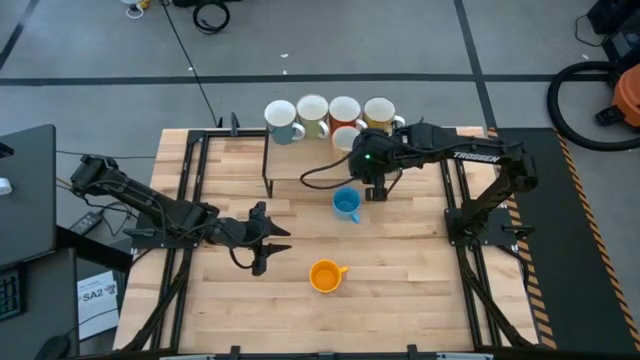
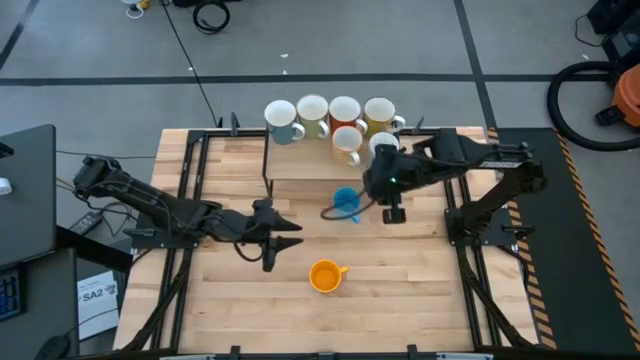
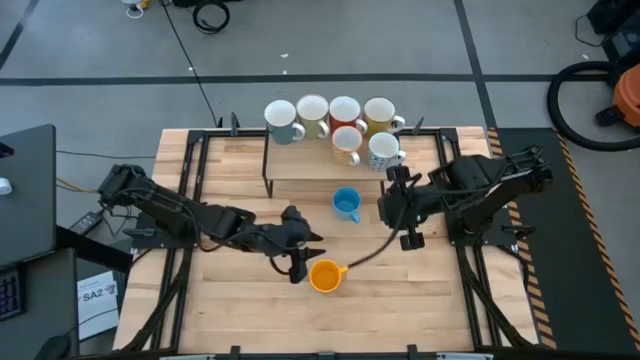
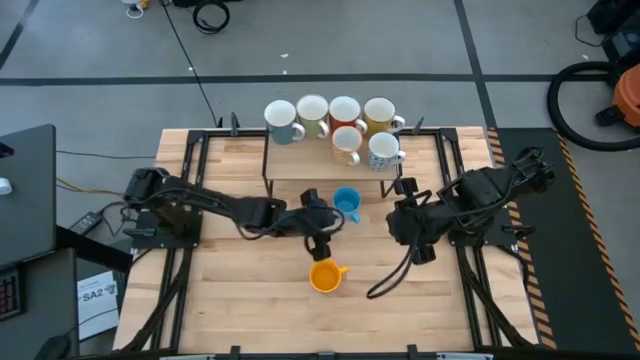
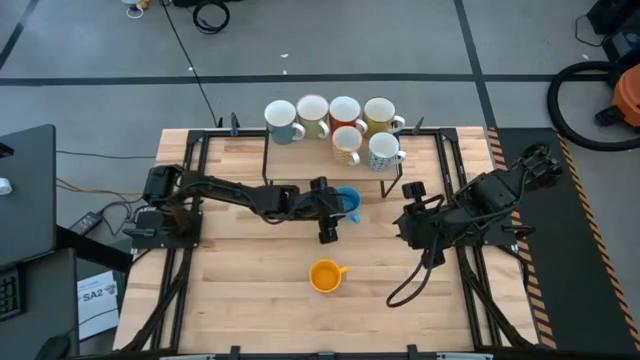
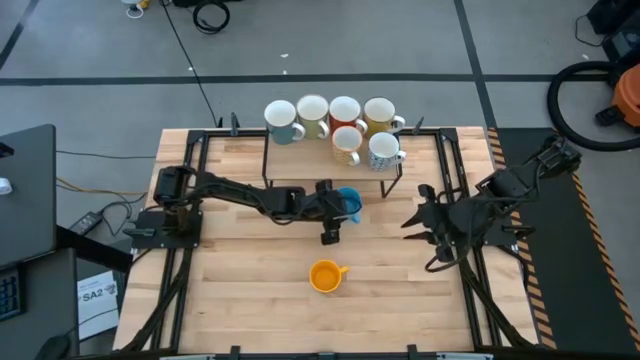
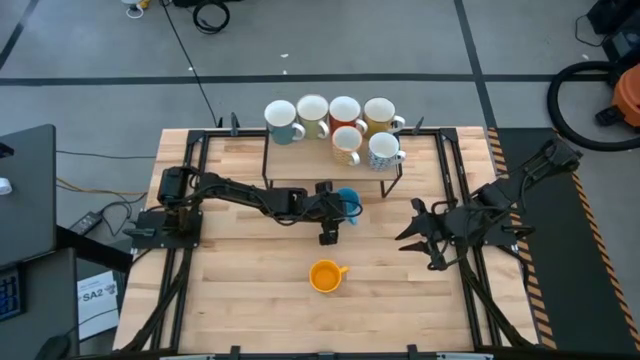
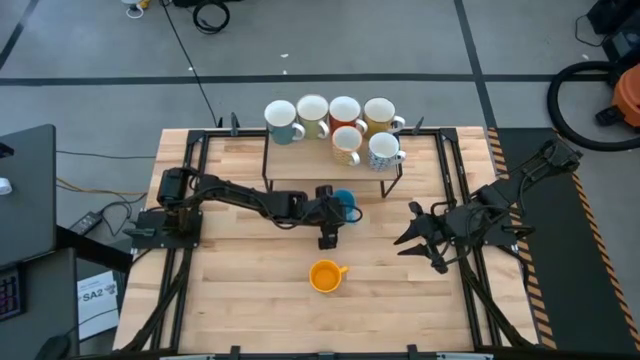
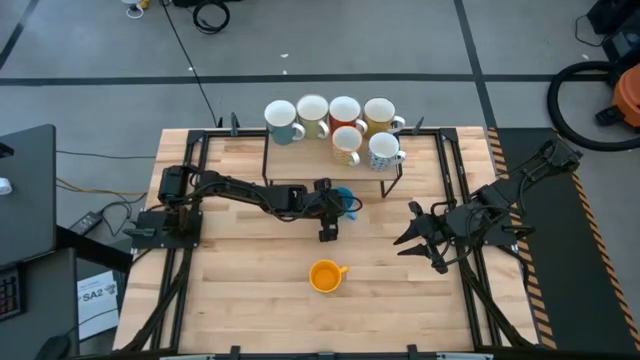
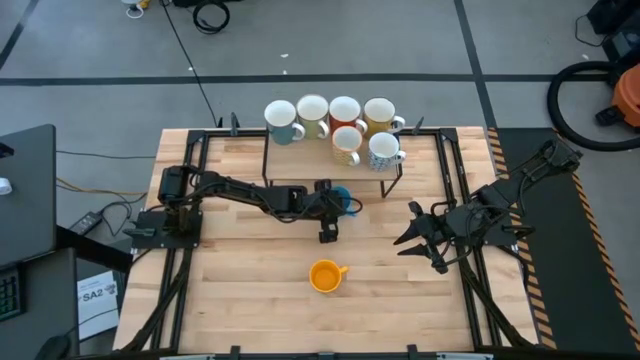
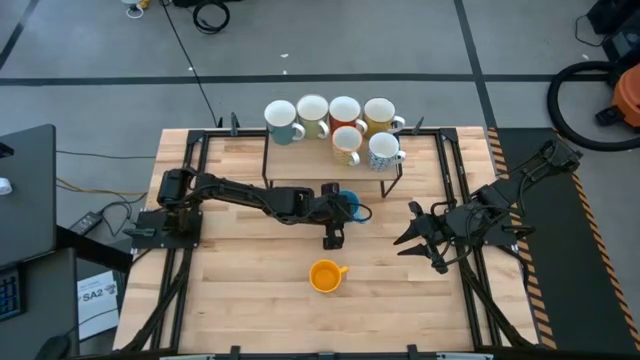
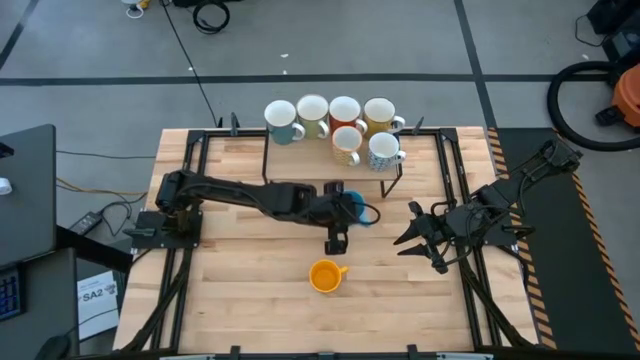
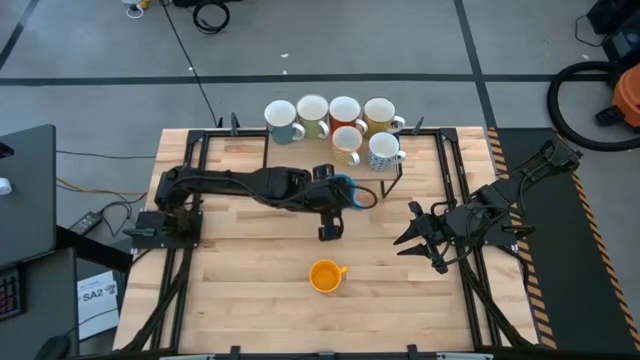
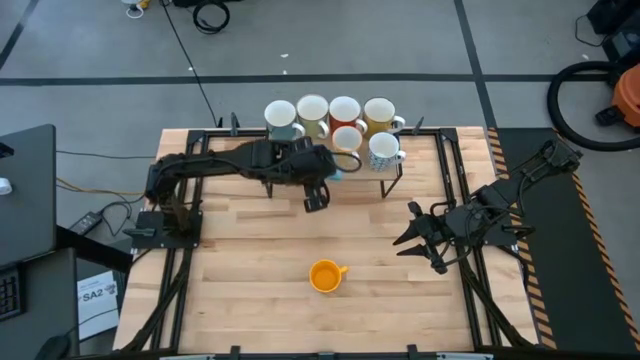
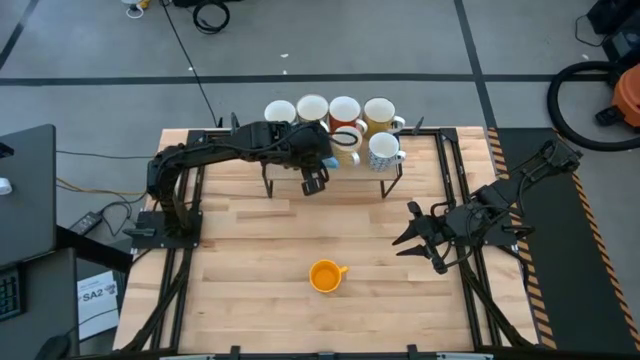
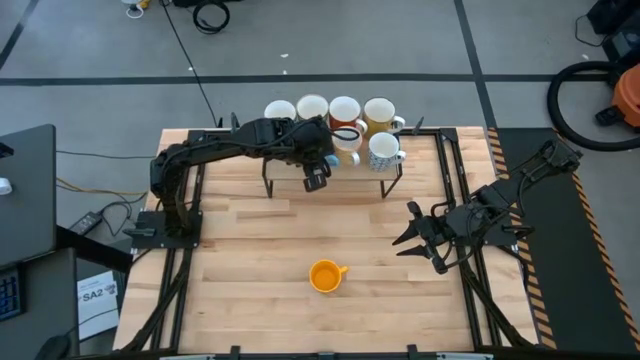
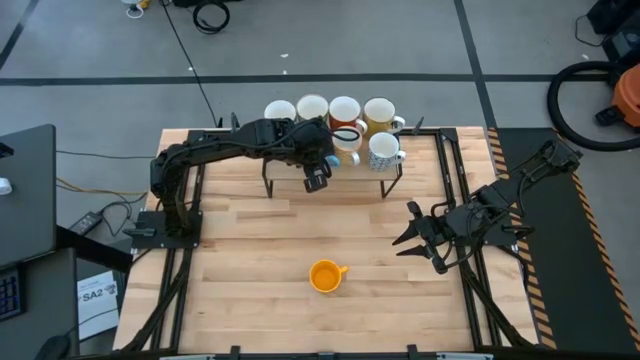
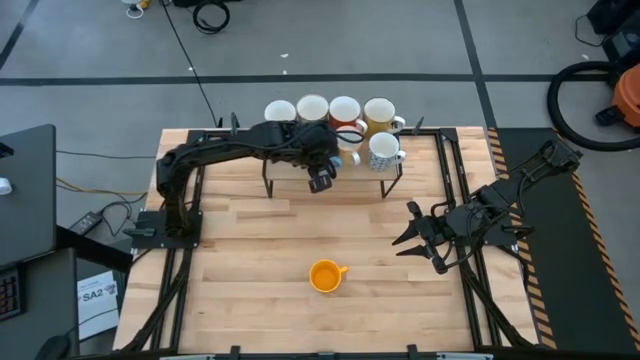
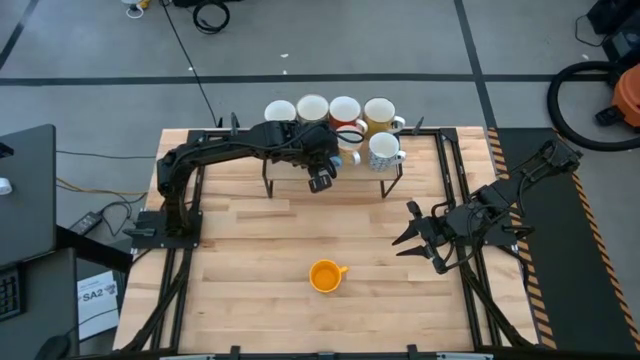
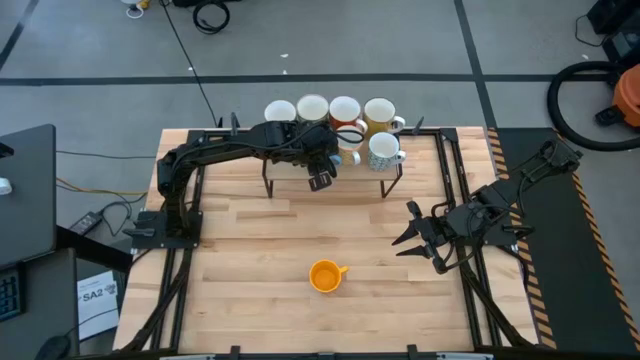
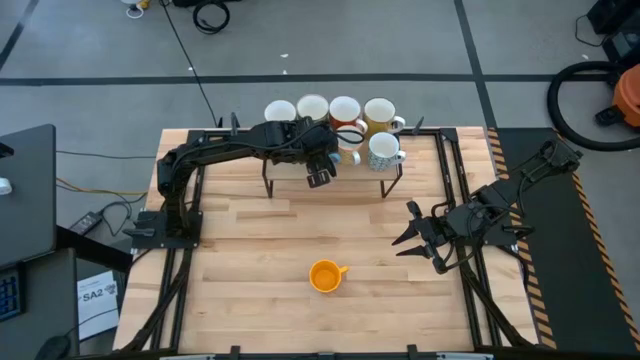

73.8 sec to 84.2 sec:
Task: Place coffee mugs
Put the blue mug on the shelf

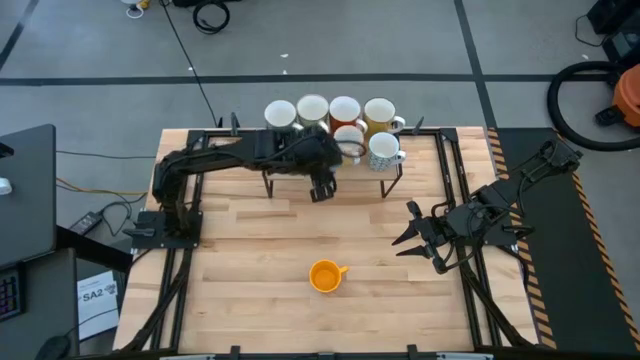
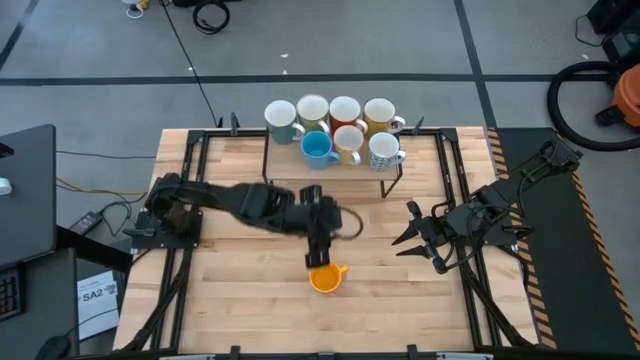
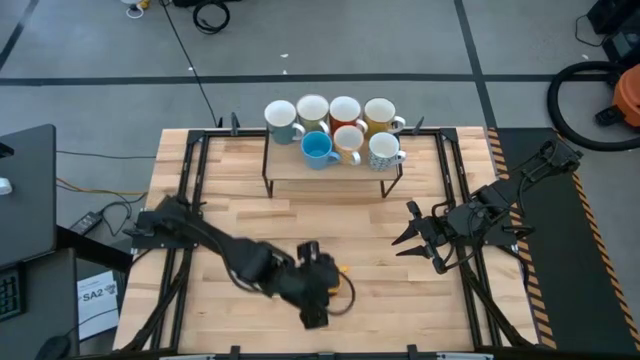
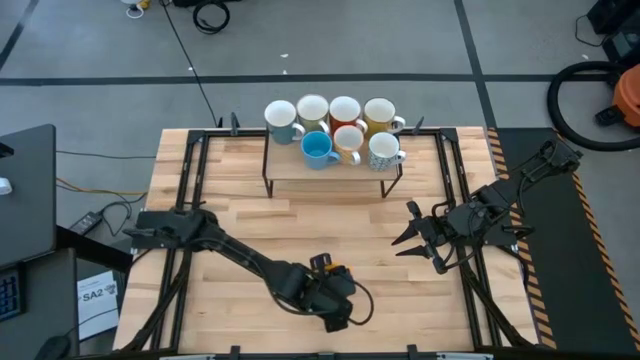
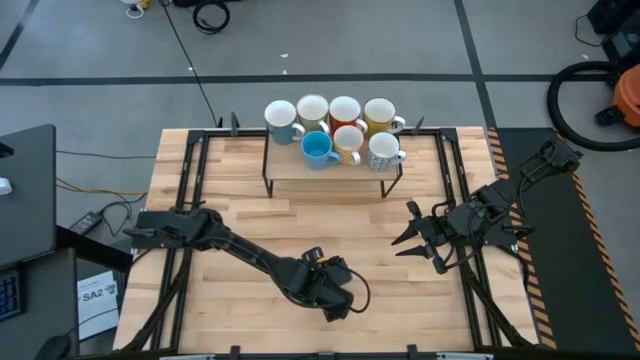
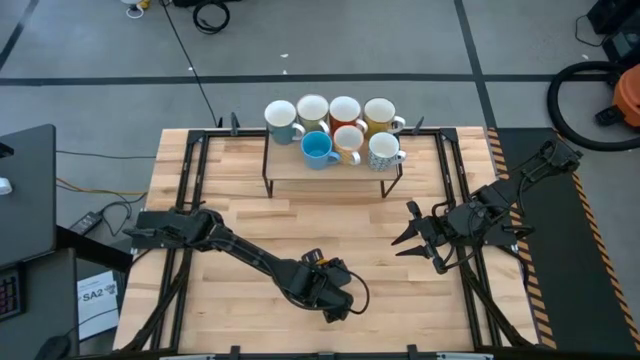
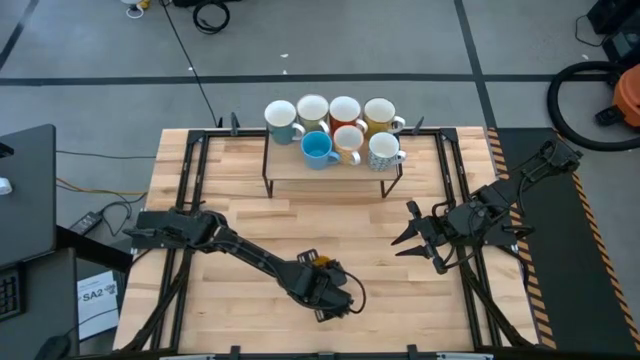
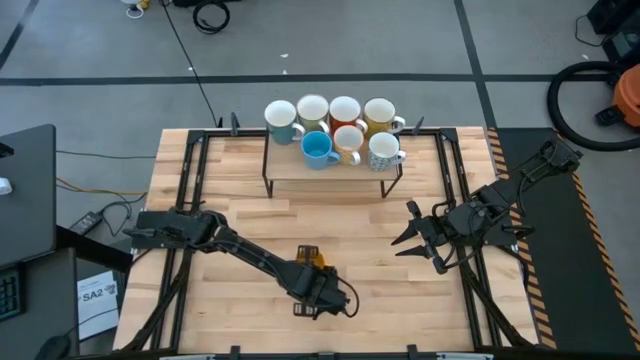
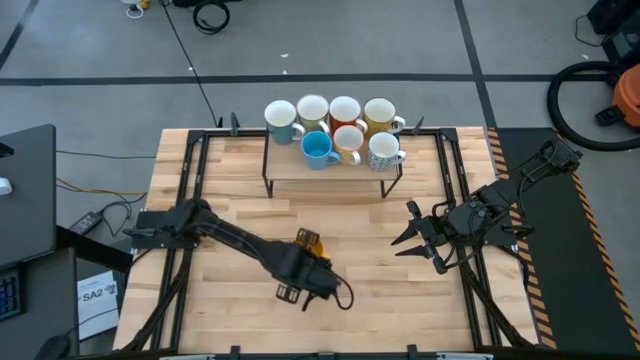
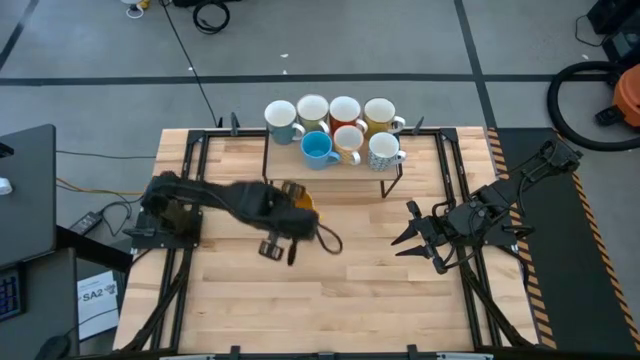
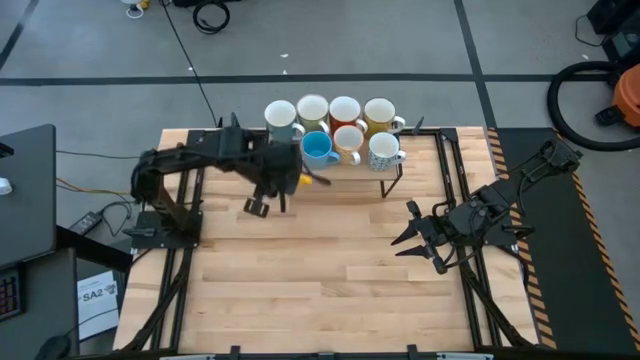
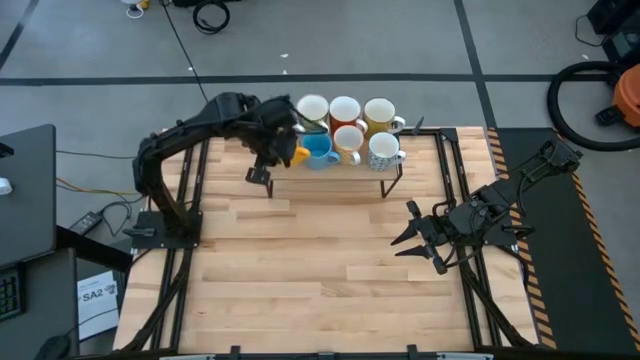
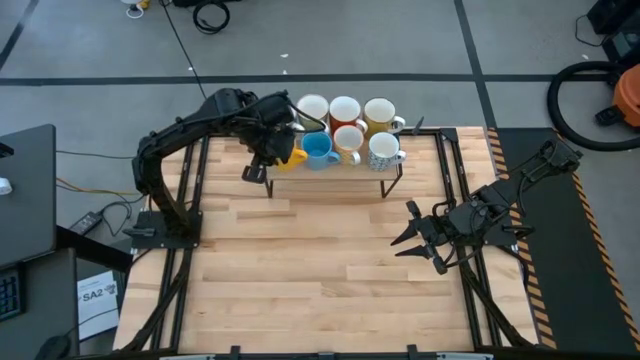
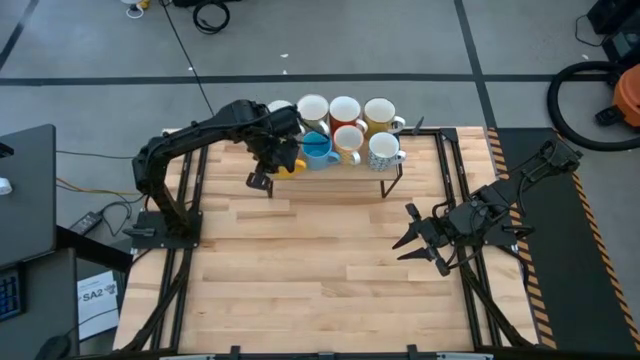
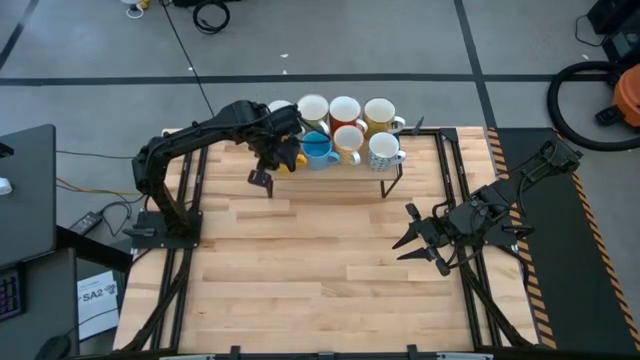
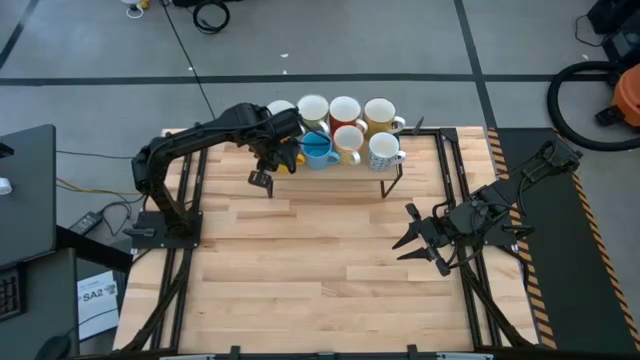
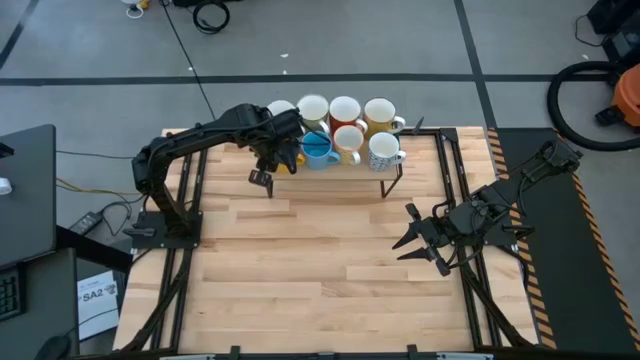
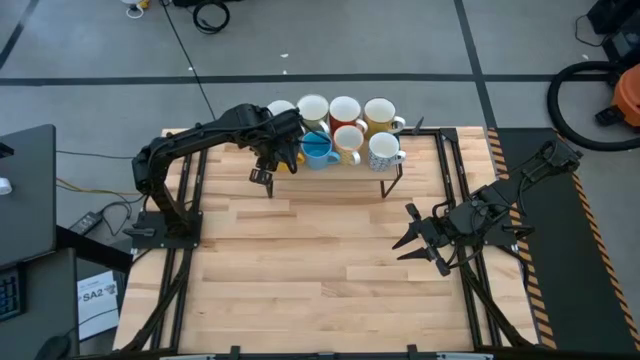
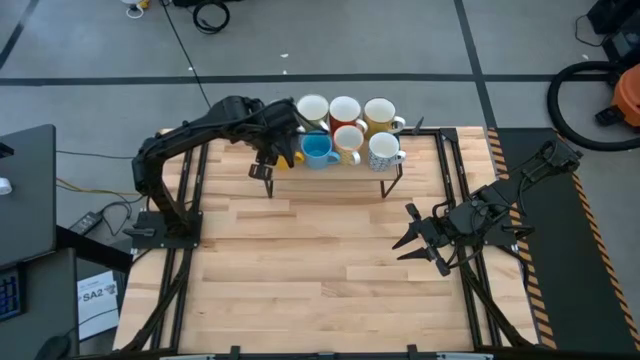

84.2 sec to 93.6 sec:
Put the yellow mug on the shelf

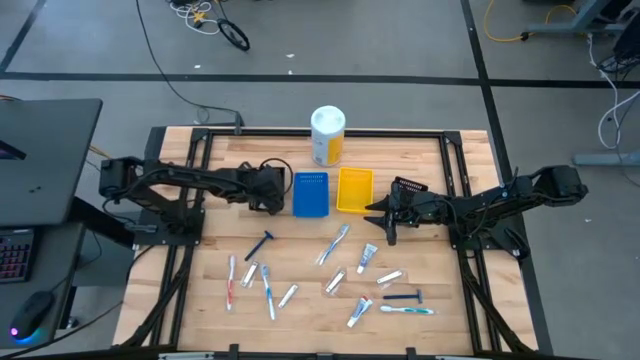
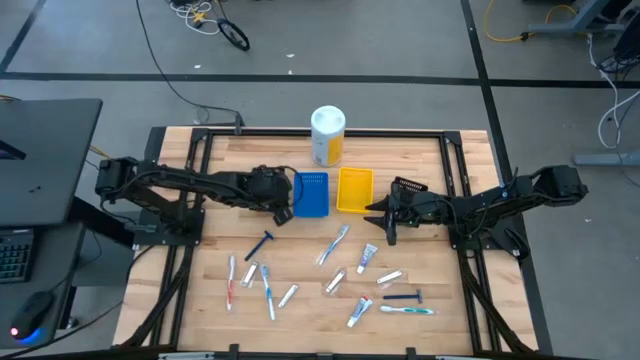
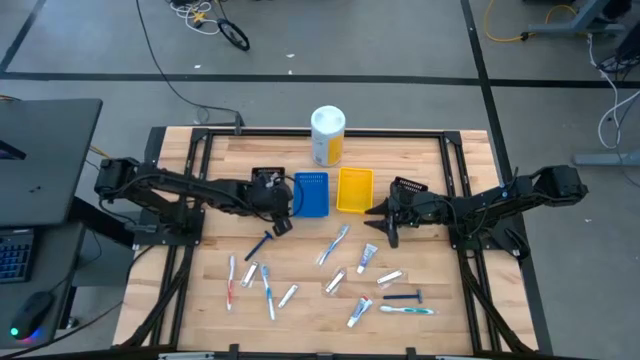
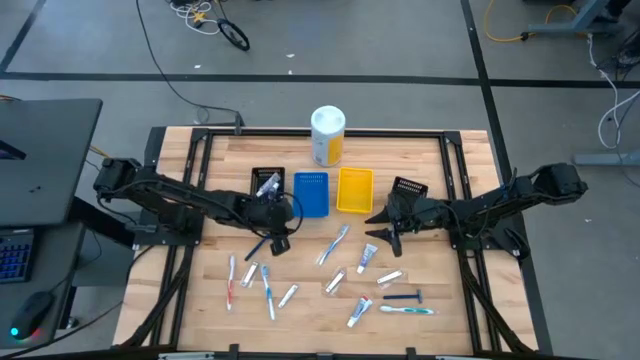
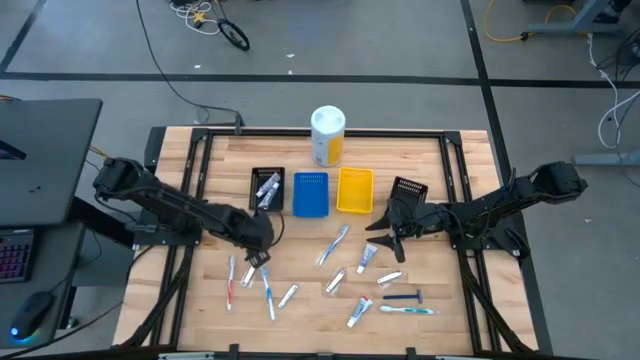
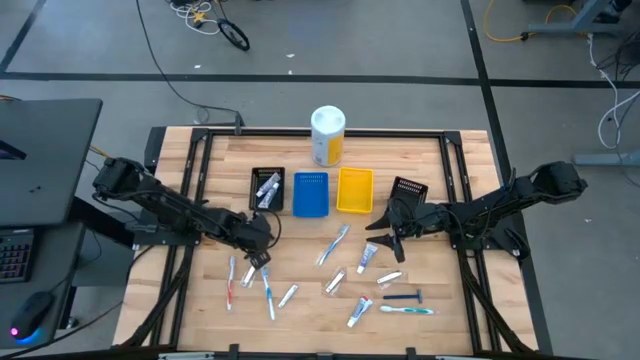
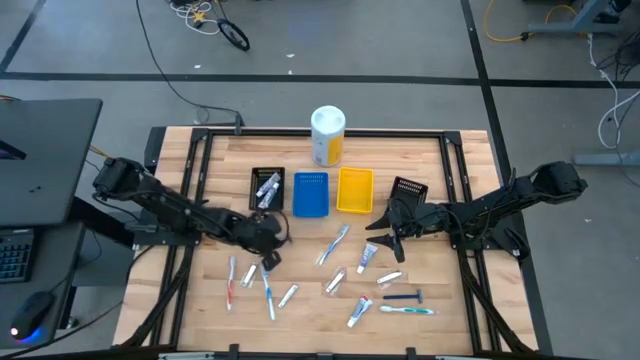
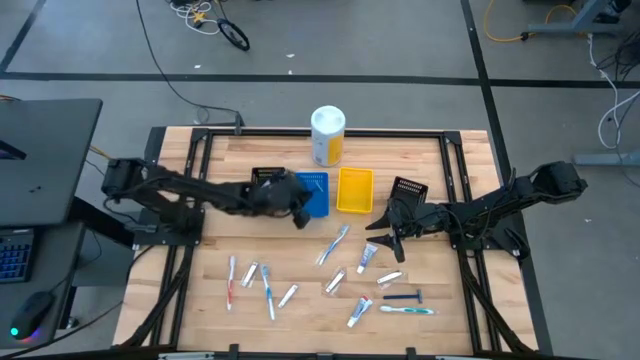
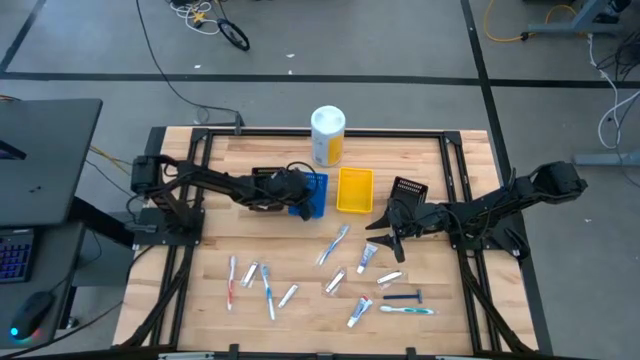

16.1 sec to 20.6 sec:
Task: Pick & Place Travel size toiletries
Put the blue razor into the blue bin
